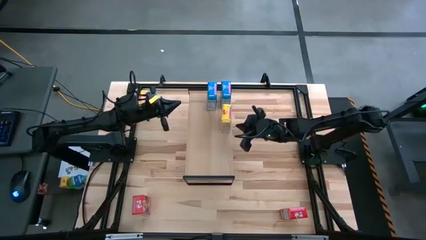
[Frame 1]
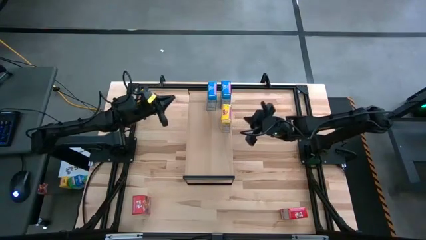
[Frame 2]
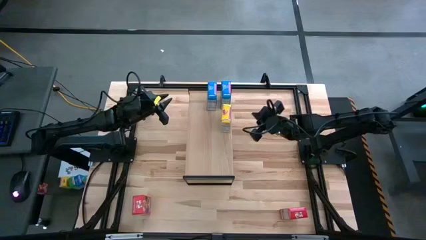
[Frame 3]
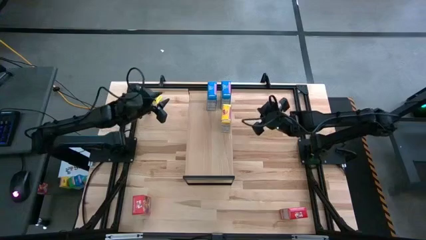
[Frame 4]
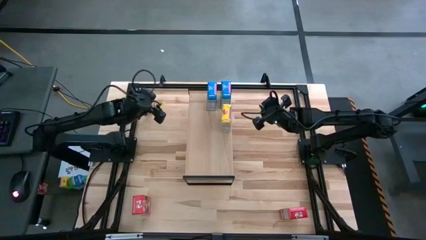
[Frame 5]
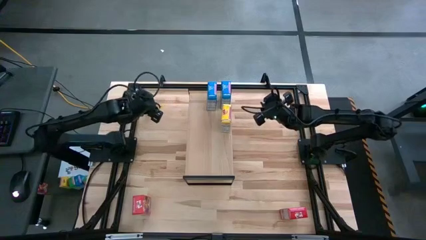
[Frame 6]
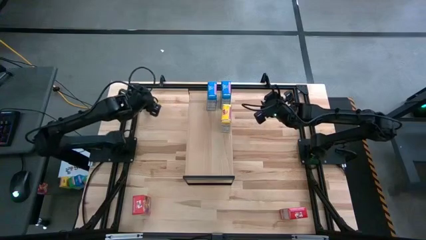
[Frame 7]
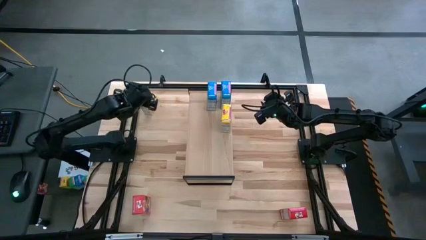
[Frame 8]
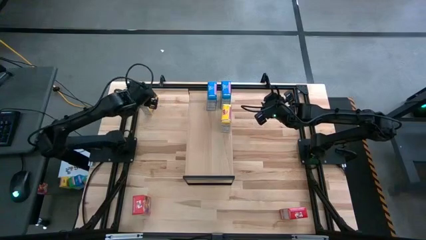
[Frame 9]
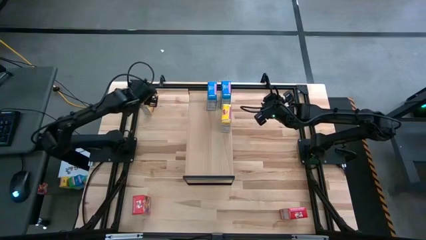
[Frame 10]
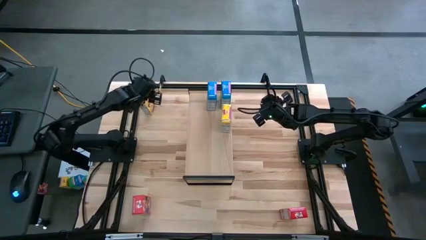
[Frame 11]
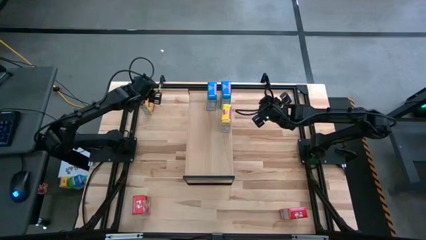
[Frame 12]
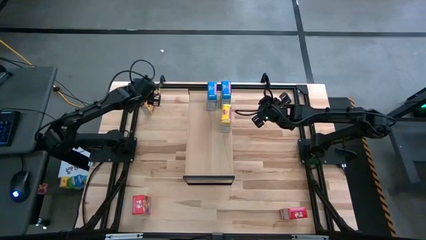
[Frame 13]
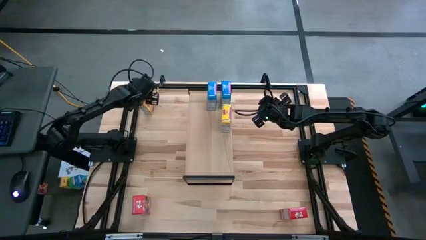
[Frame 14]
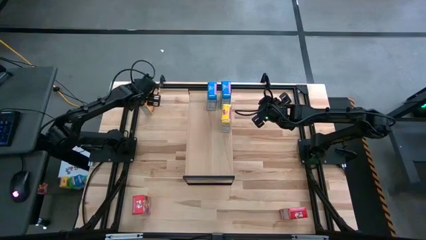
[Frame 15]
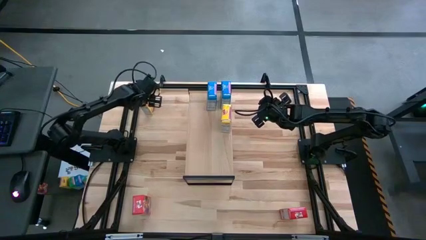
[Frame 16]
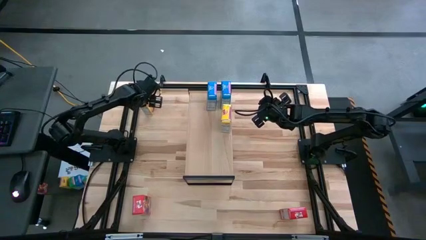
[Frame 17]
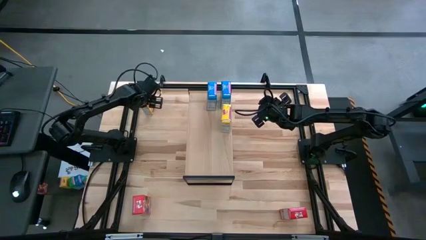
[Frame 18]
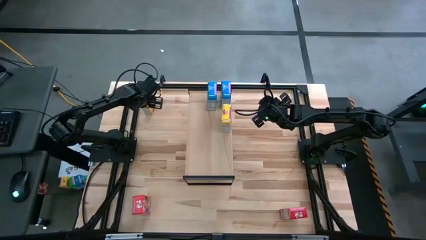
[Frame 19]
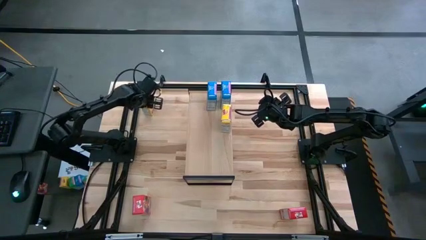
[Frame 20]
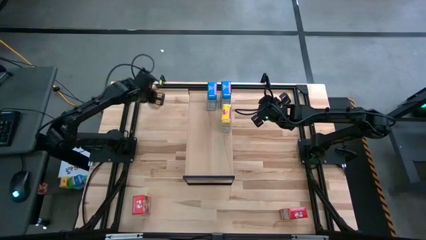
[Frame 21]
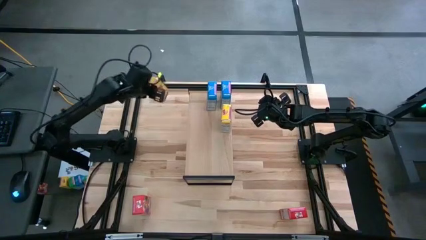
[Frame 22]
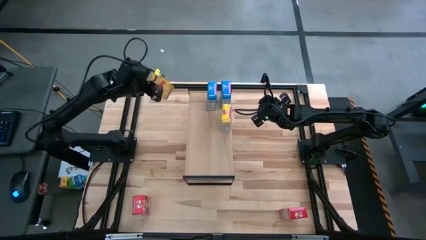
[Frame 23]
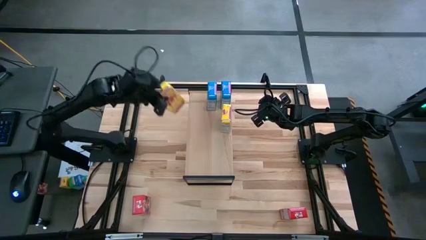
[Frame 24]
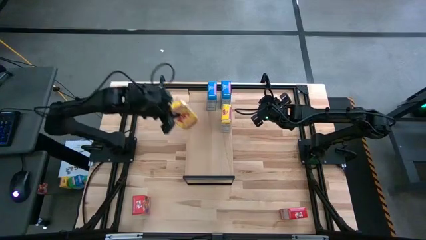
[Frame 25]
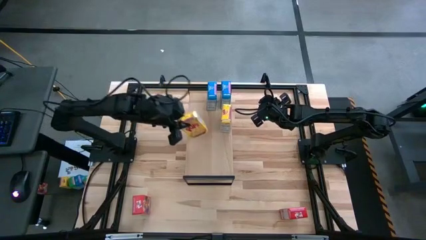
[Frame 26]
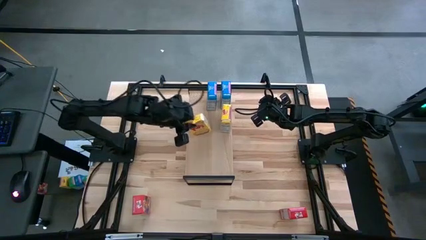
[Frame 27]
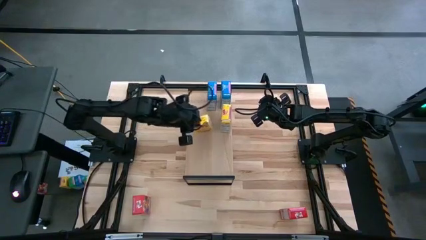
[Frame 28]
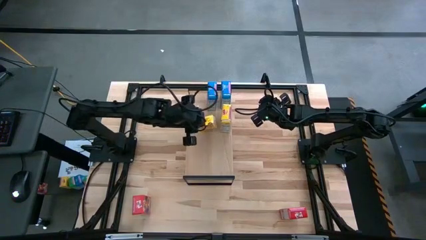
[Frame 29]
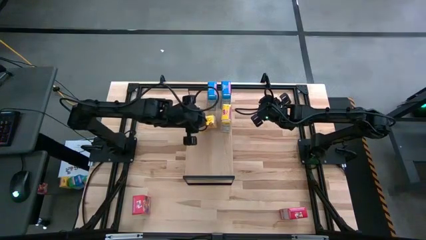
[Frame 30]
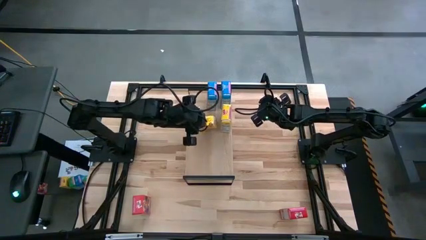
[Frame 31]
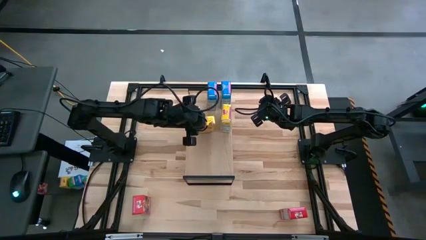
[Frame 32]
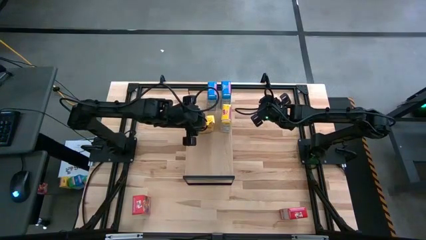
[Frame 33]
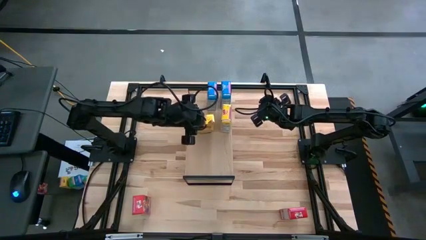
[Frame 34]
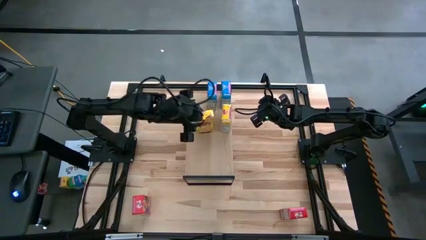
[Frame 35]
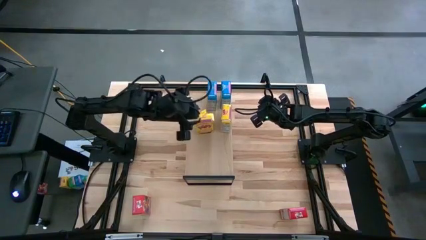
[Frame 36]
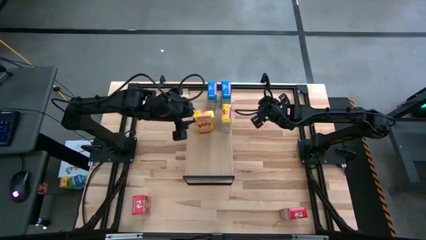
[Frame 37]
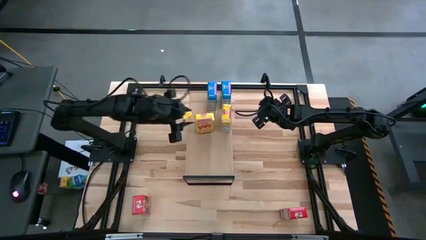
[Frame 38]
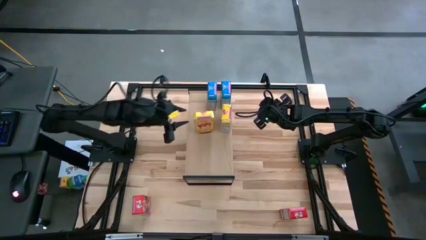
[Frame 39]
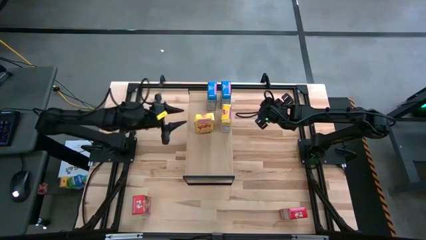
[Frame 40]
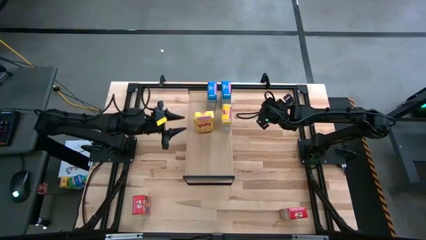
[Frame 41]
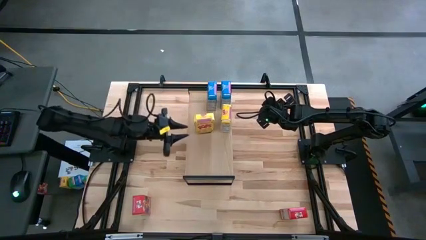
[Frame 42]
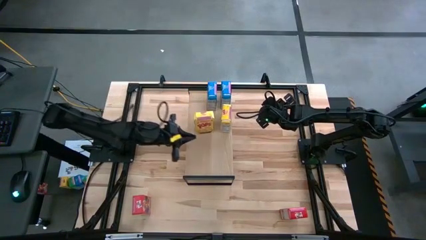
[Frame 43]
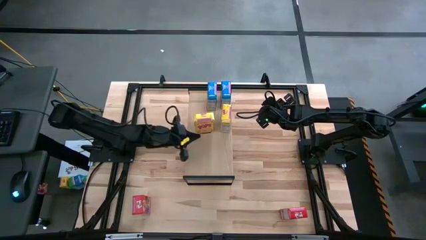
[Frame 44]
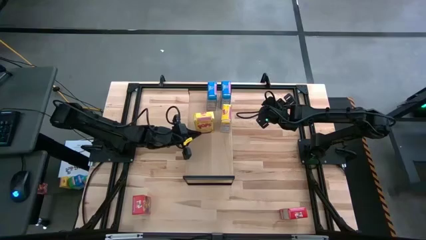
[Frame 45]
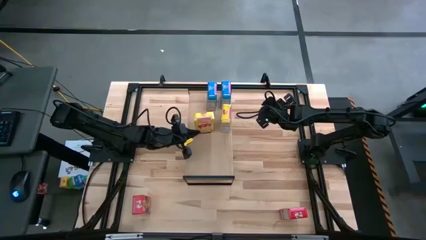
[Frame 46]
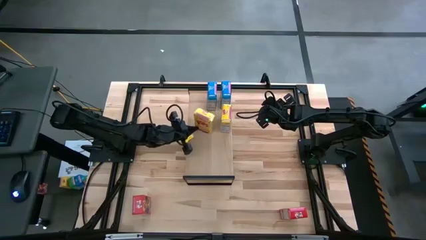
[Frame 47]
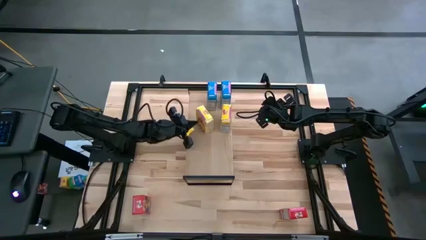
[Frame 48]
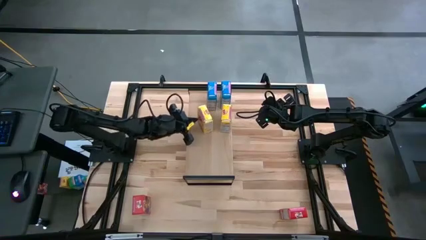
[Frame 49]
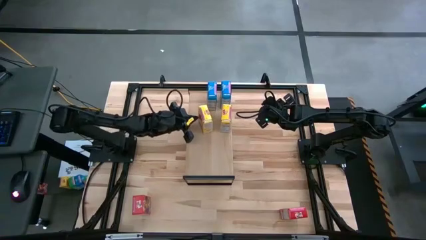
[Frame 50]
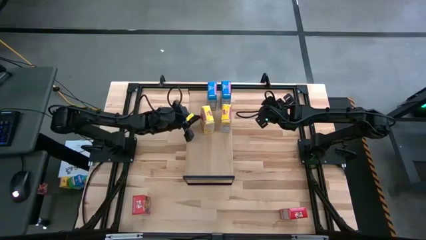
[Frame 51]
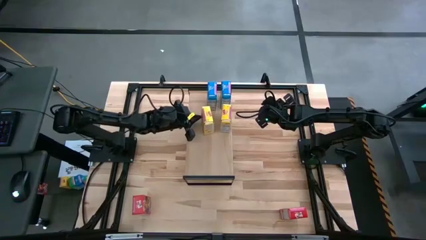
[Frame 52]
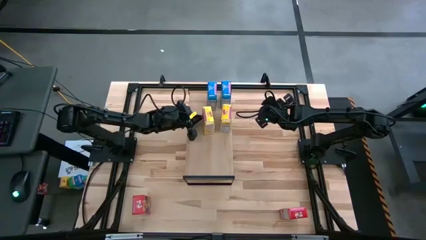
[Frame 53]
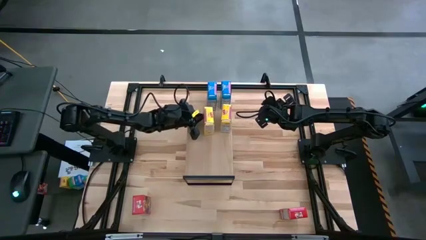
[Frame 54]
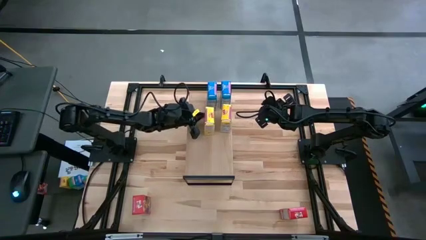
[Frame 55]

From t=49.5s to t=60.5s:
Task: Stack cereal on shelf
Put the yellow cereal box on the shelf

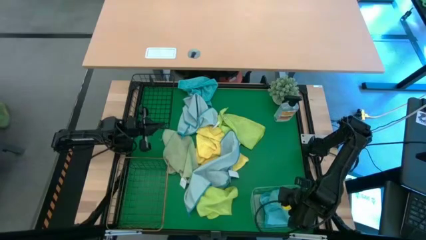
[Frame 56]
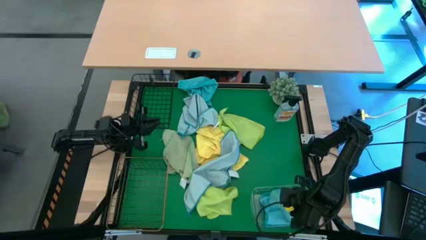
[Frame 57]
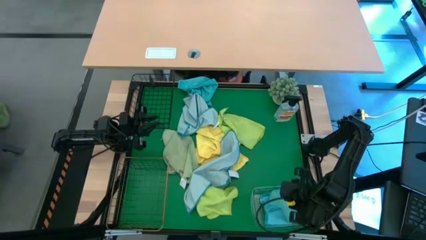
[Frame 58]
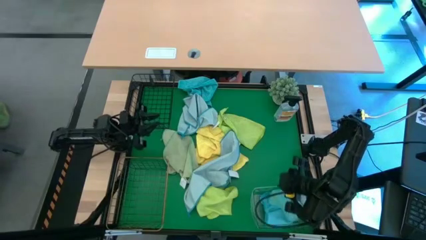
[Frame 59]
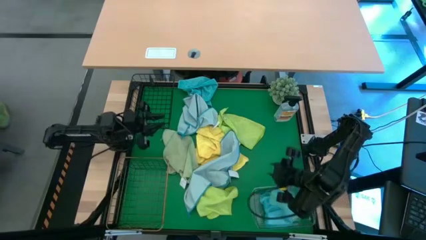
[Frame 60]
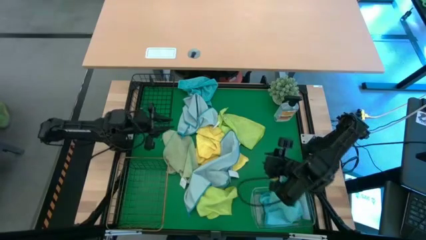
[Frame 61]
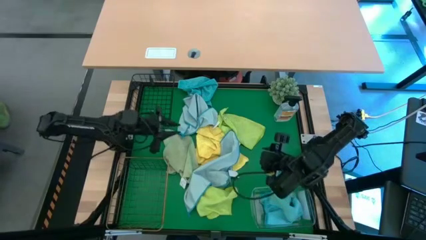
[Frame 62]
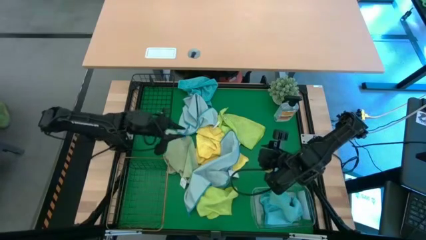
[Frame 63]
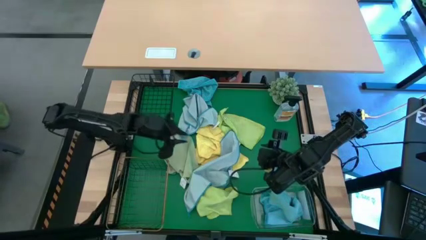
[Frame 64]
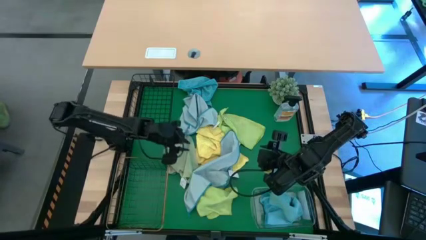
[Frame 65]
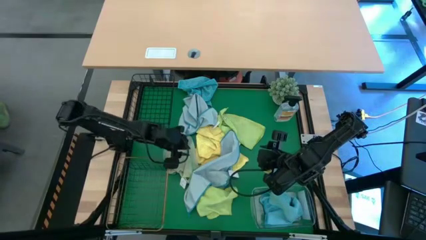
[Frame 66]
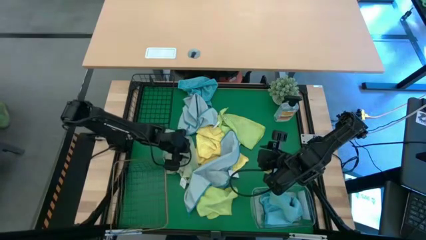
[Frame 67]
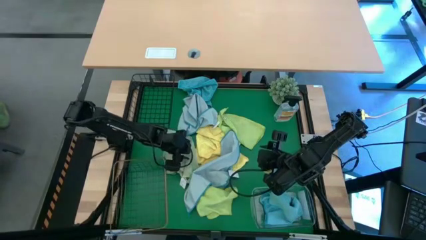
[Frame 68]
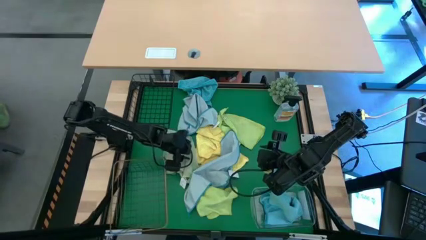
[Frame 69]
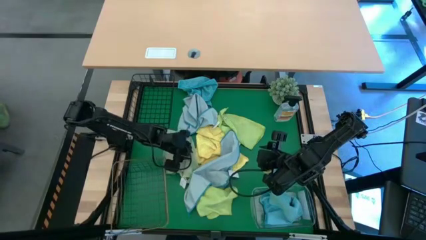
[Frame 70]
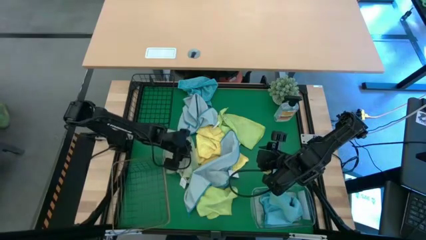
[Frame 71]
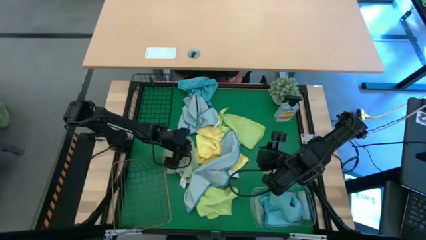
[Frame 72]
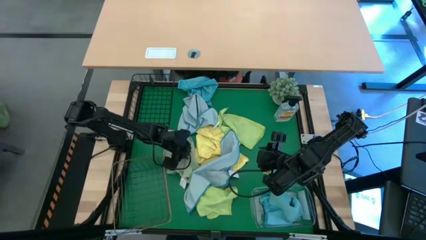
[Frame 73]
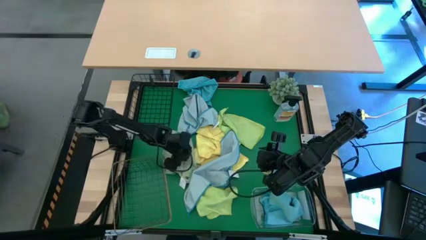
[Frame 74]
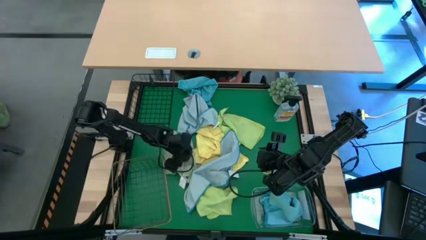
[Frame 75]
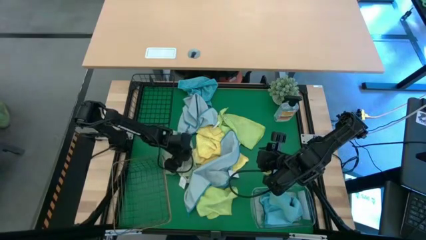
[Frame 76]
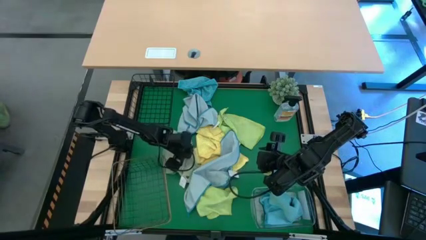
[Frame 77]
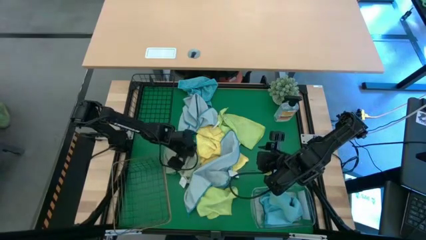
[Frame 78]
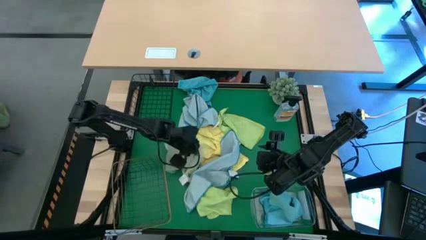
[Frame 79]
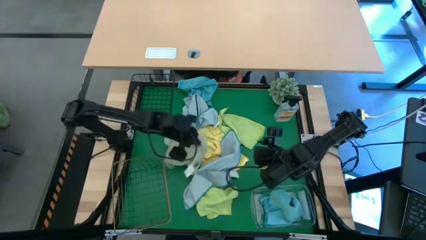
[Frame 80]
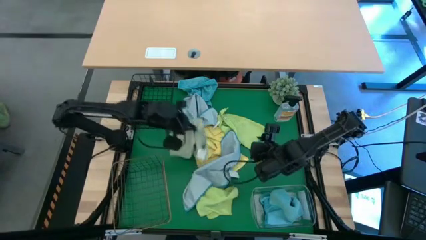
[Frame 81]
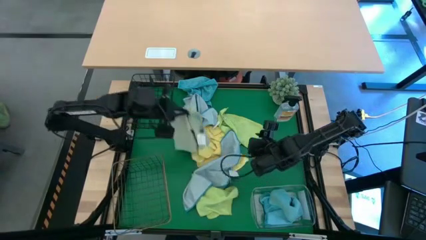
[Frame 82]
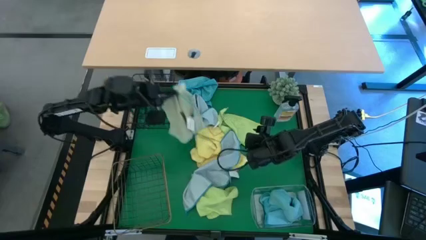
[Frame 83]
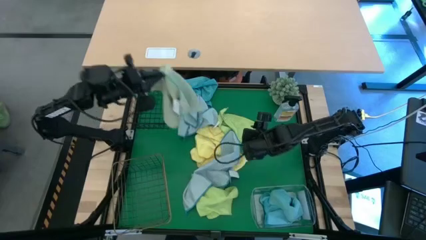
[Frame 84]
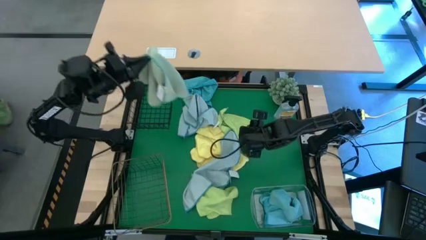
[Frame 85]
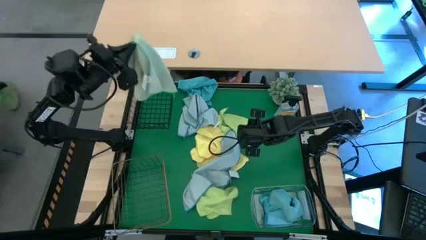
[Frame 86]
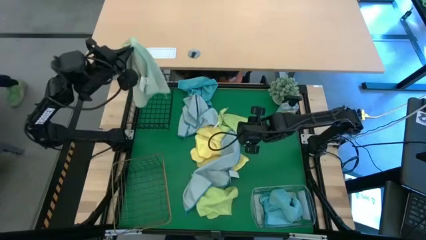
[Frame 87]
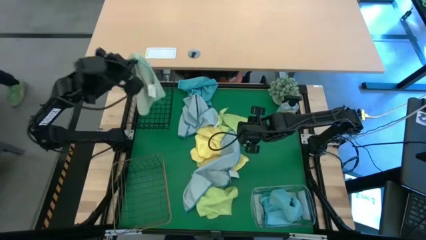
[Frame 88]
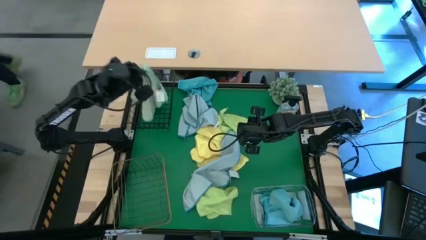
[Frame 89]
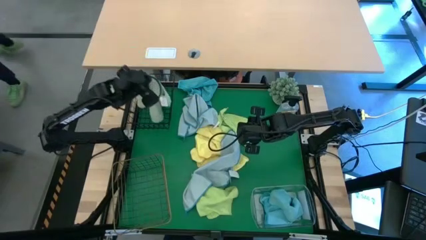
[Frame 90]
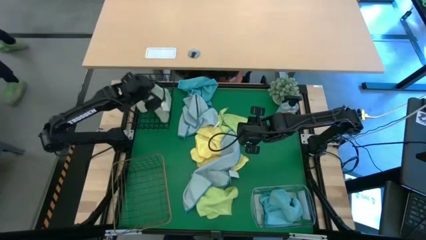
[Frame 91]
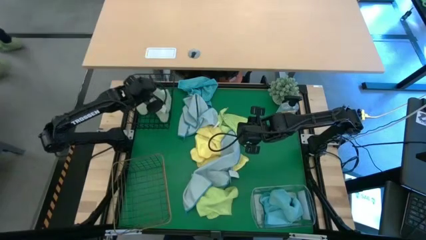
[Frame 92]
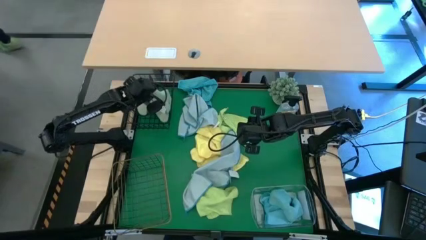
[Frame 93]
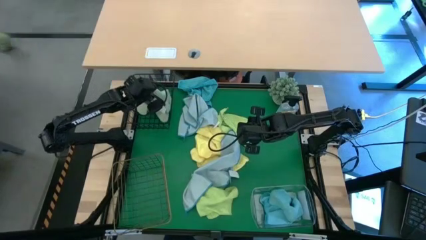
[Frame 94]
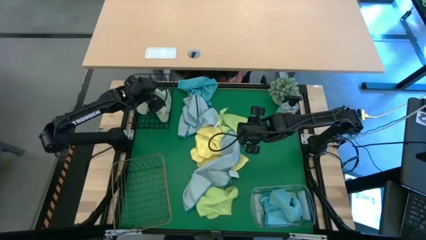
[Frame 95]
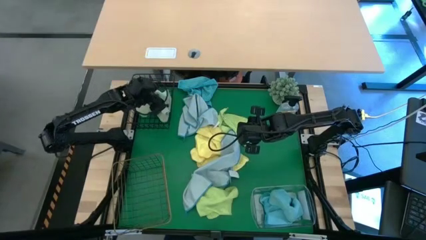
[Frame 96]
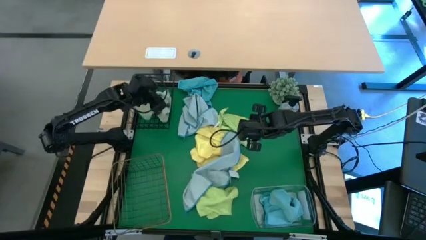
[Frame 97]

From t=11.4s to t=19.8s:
Task: Sort microfiber towel by color & place in baskets
Put the light green microfiber cloth into the black wire basket
